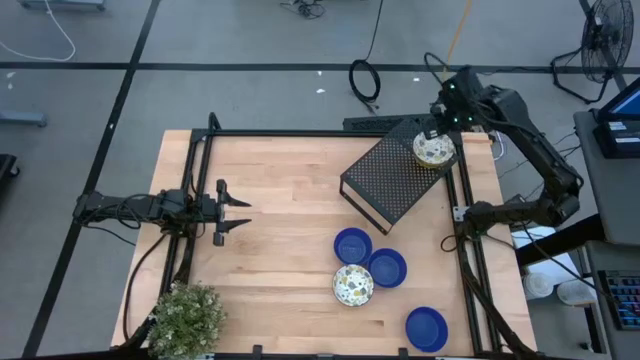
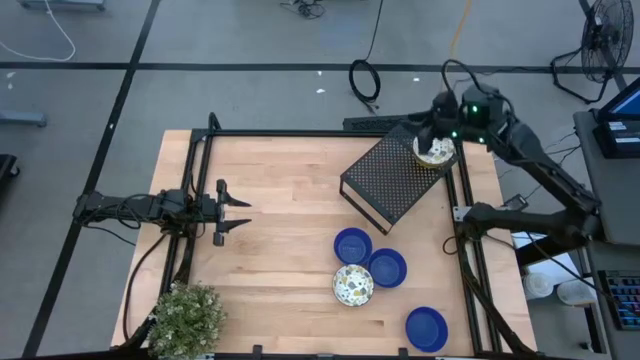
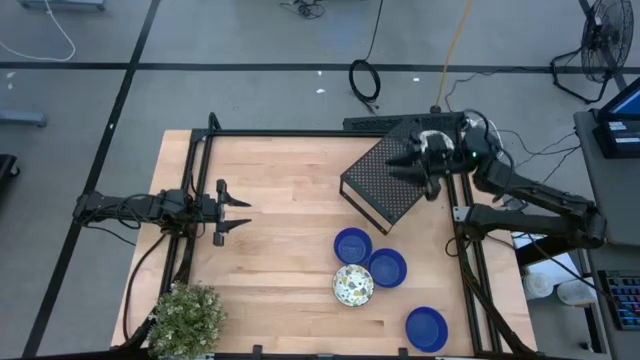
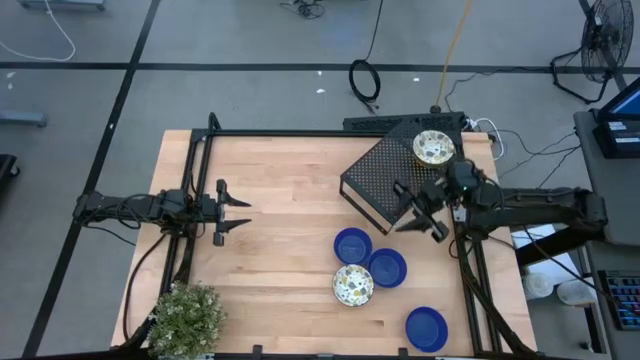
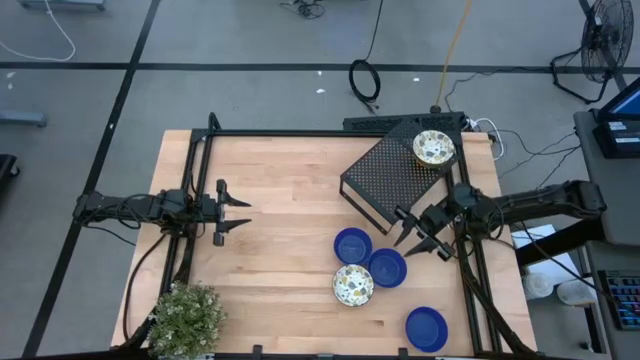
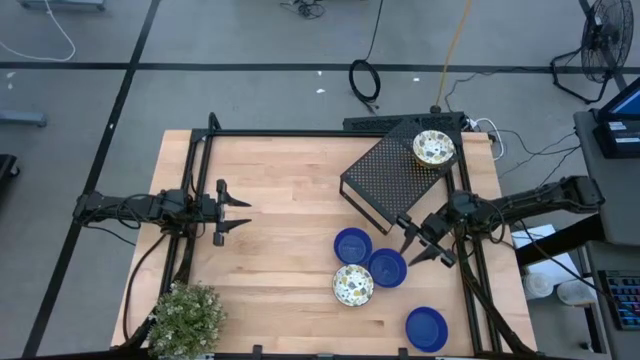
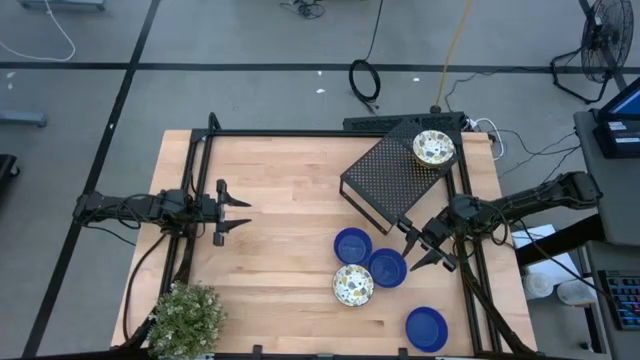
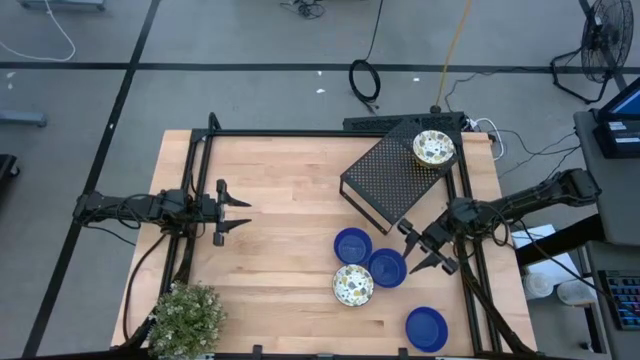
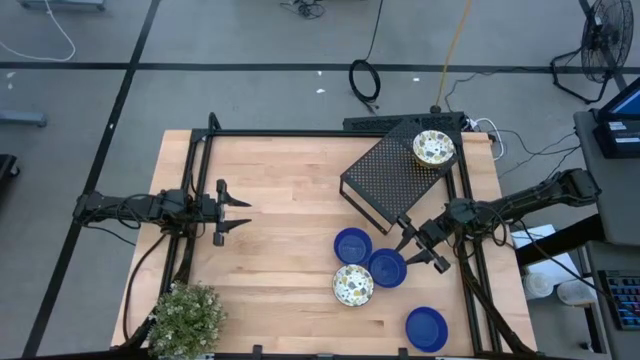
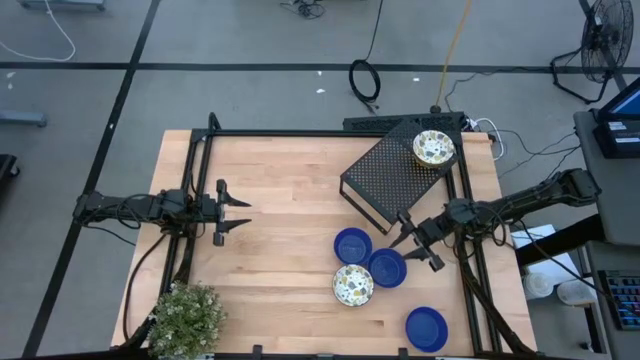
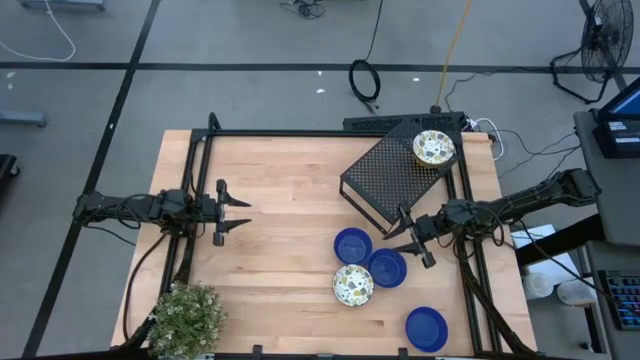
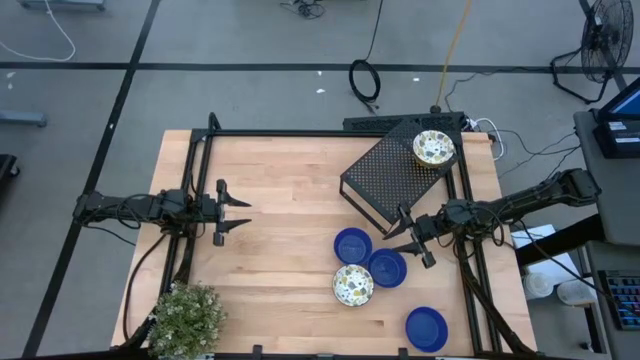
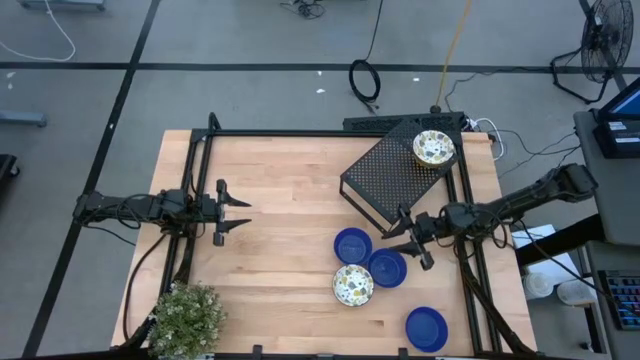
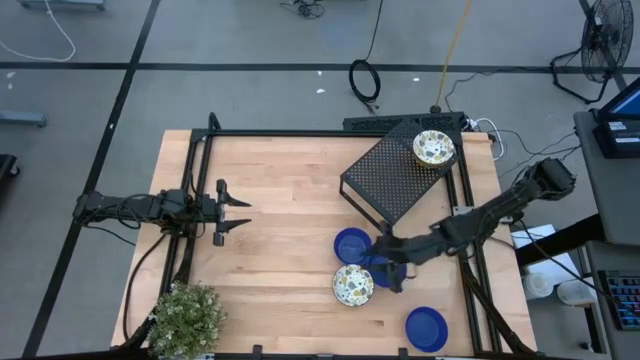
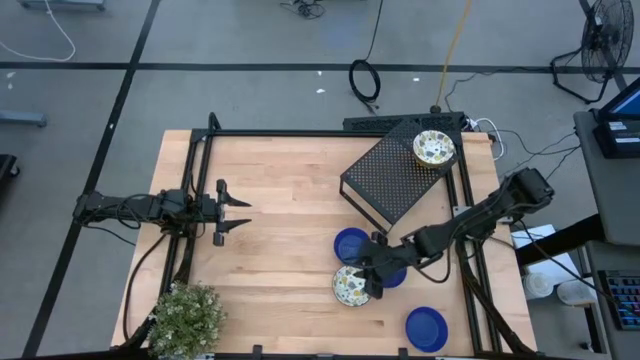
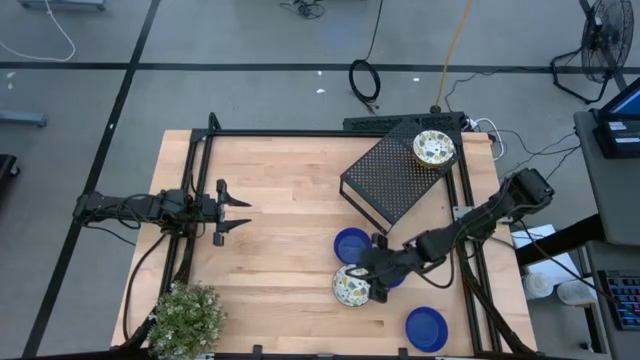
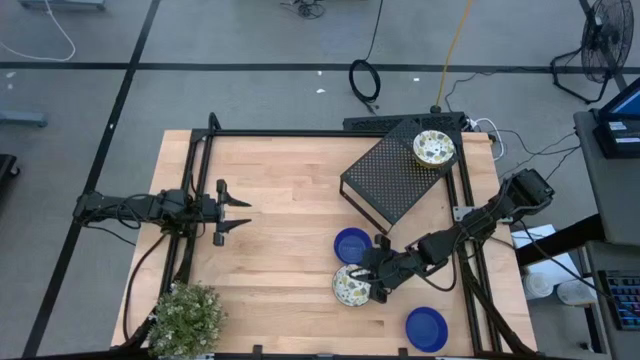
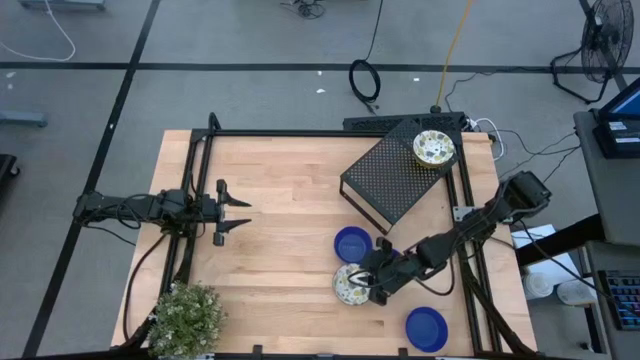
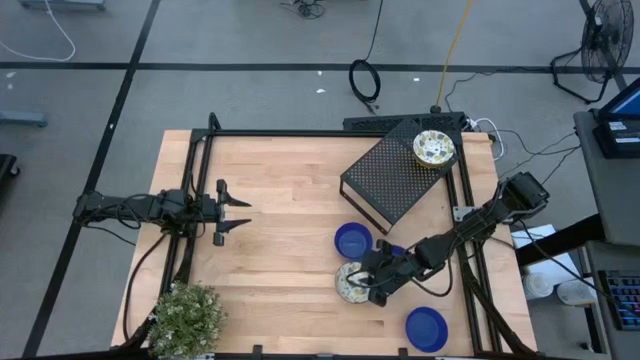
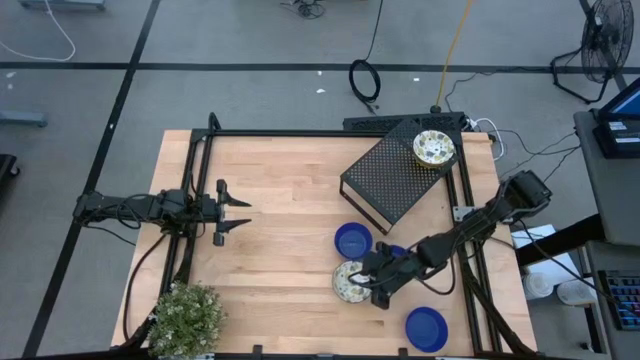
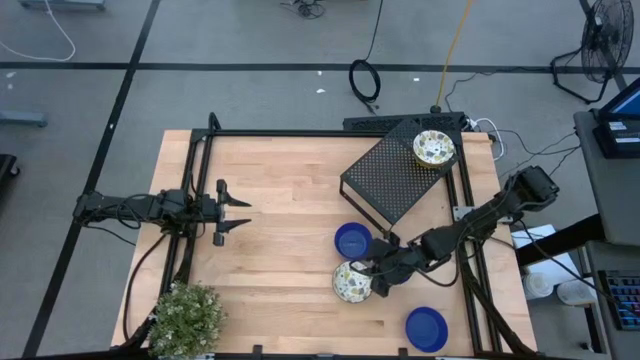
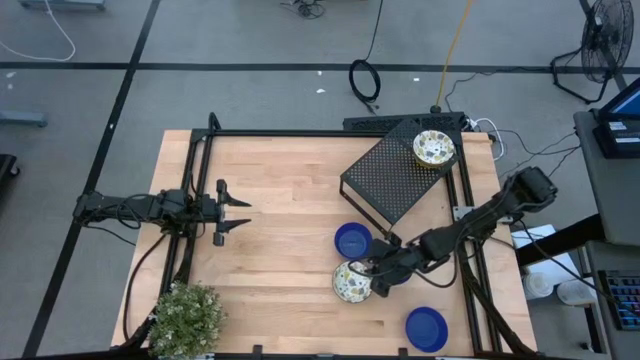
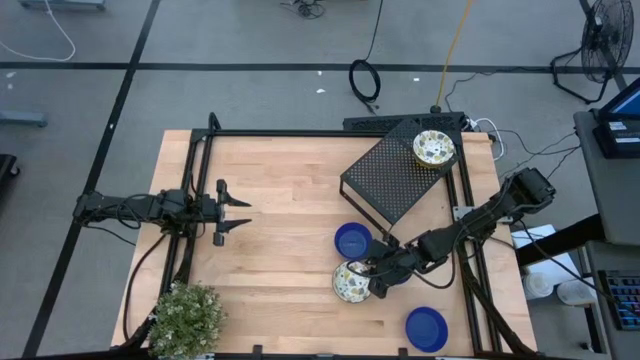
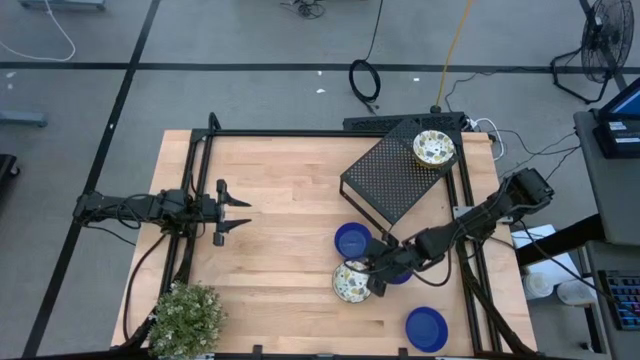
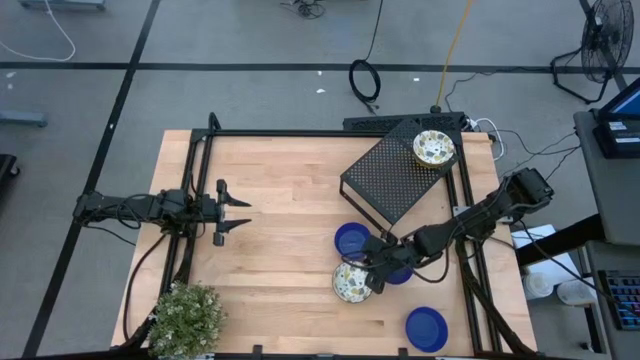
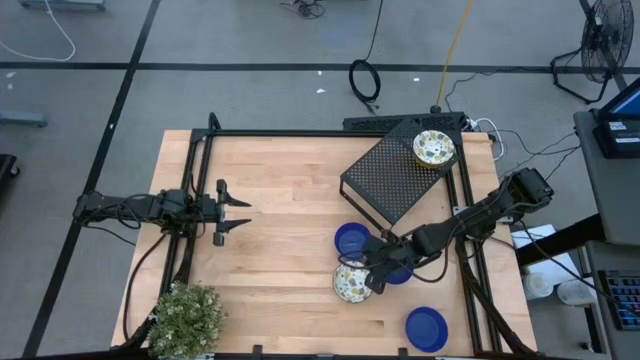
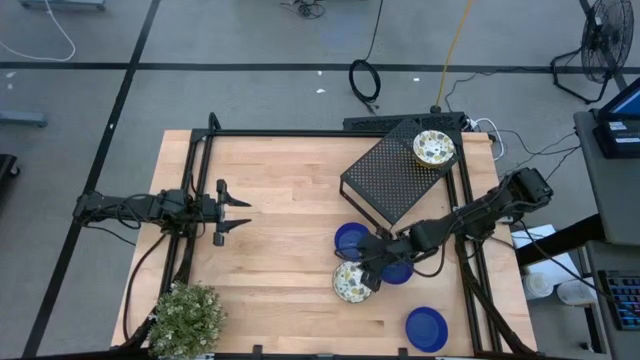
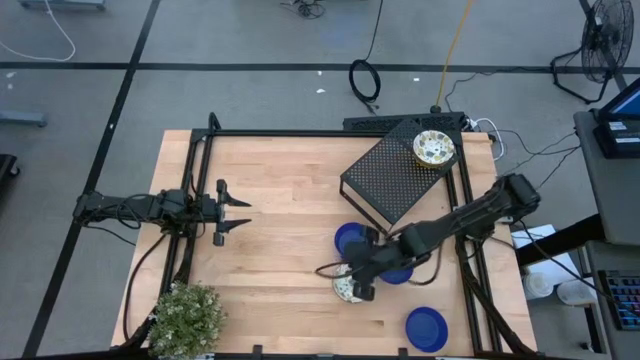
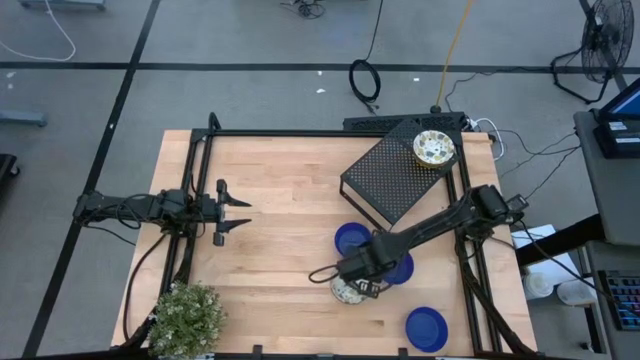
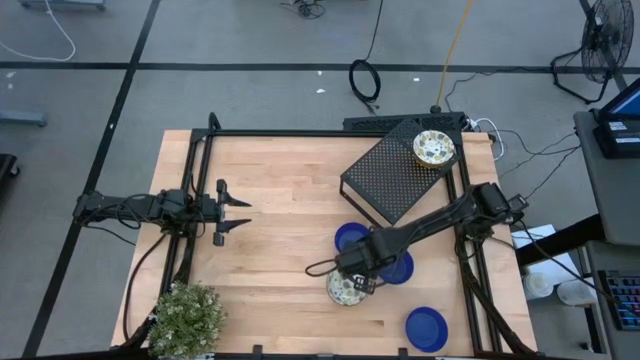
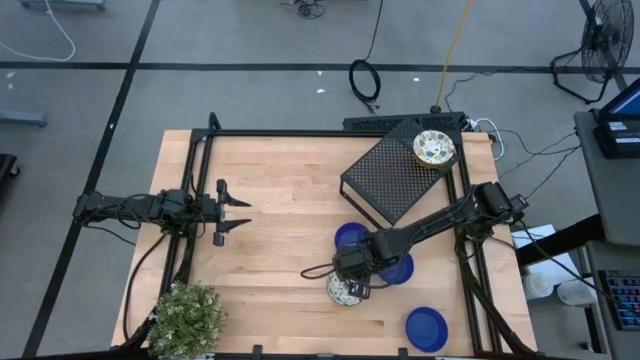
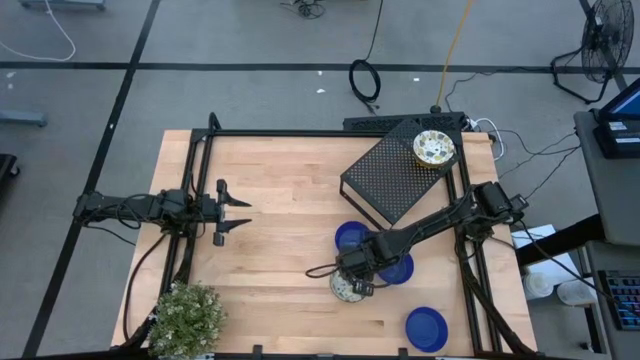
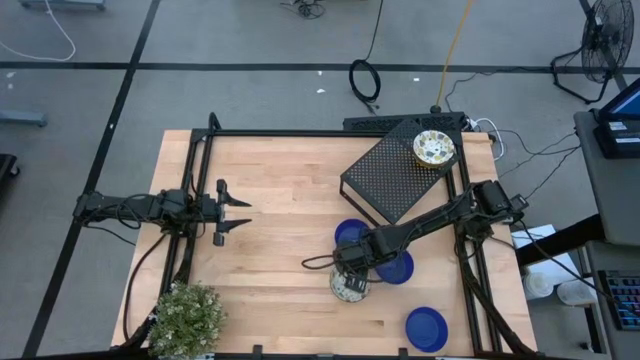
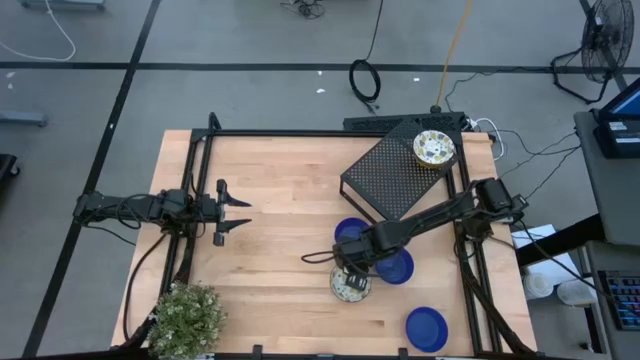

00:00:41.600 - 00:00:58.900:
Task: Pick & Place Mini bowls
Stack the patterned yellow bowl on the patterned yellow bowl on the shelf

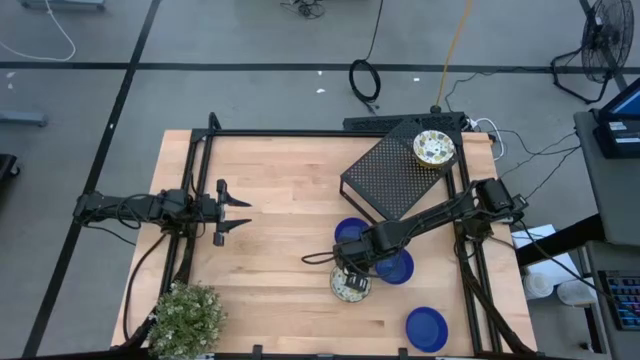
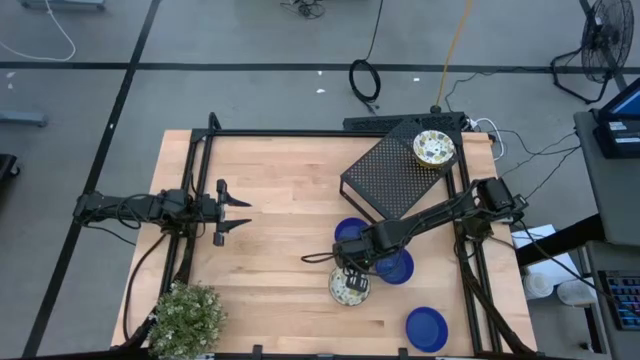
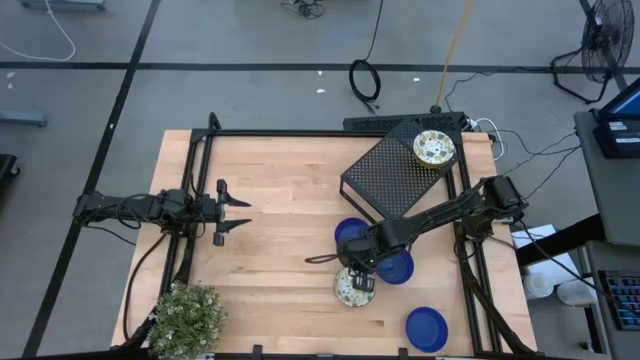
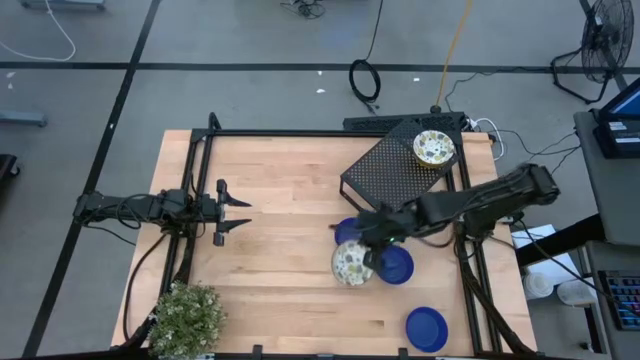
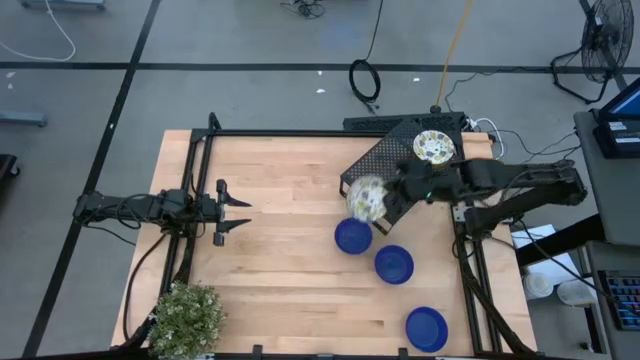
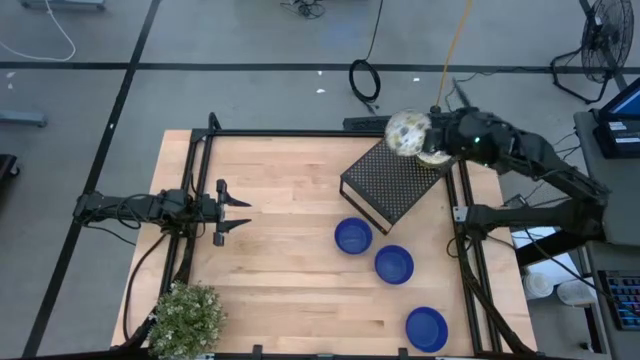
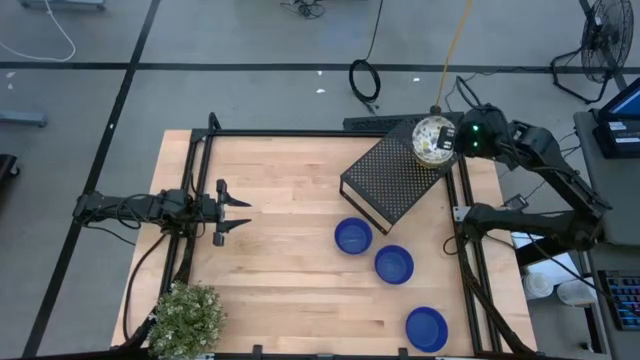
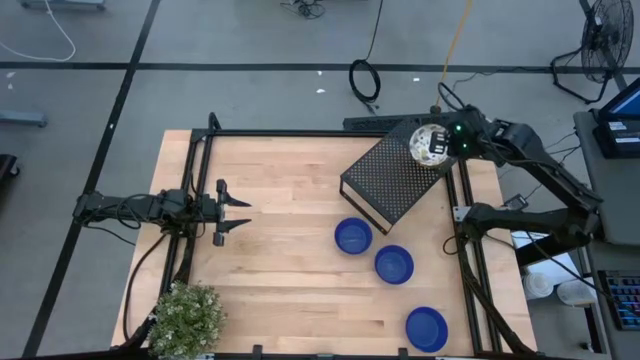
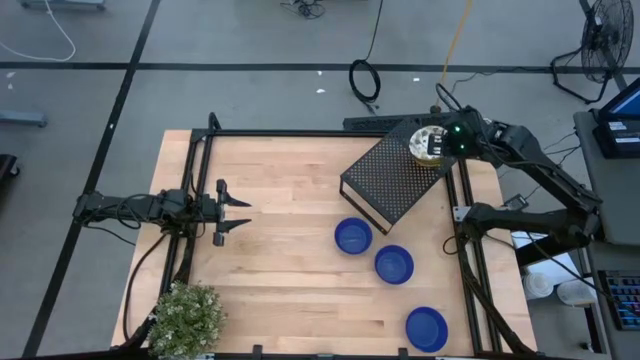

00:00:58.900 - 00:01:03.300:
Stack the patterned yellow bowl on the patterned yellow bowl on the shelf
